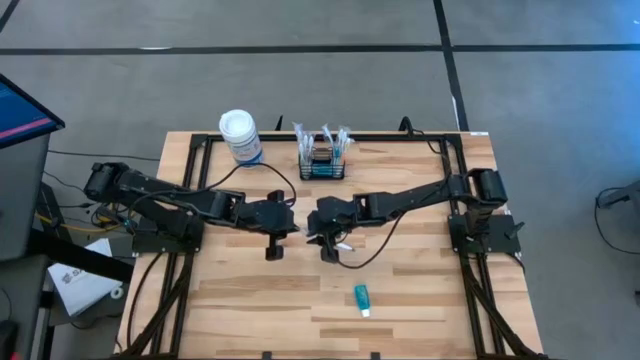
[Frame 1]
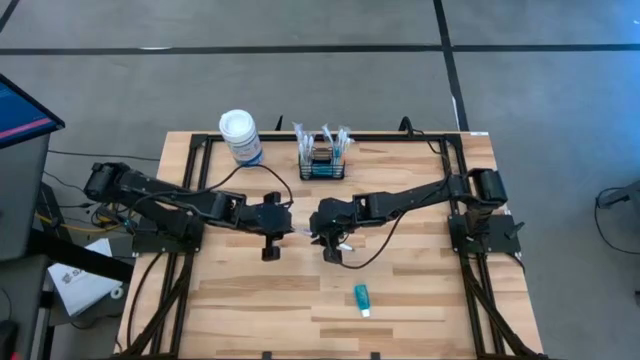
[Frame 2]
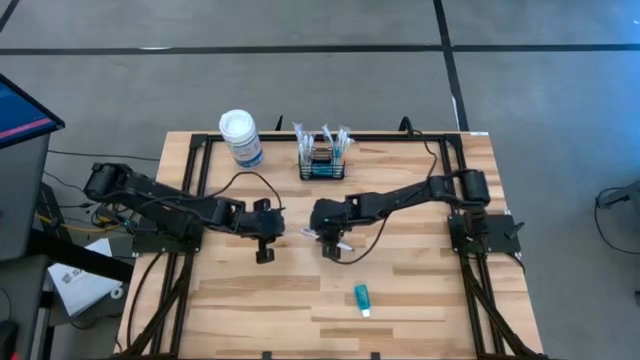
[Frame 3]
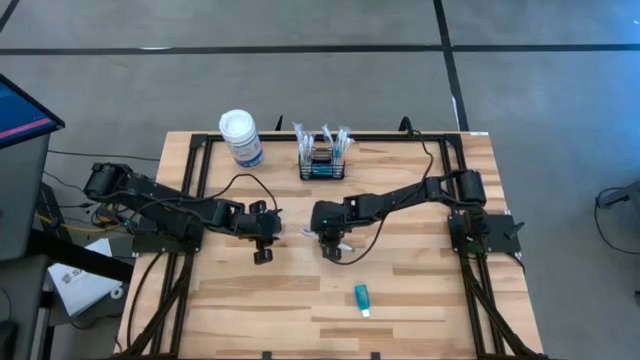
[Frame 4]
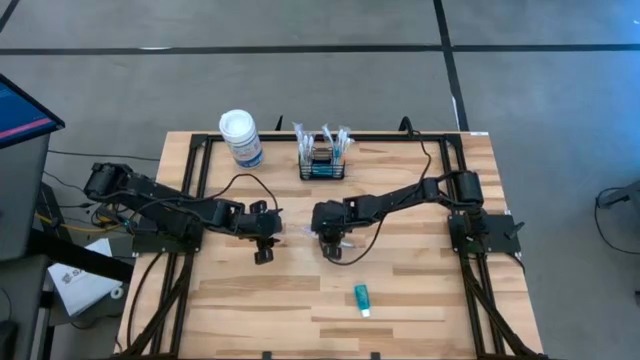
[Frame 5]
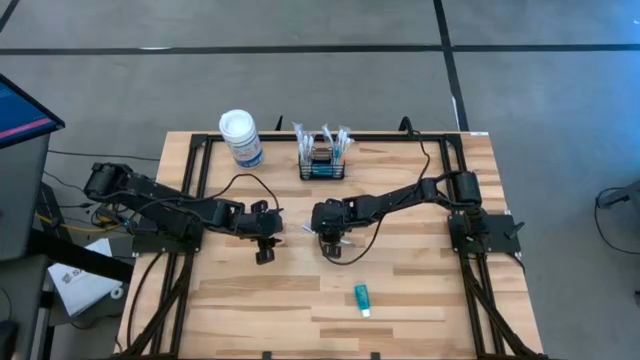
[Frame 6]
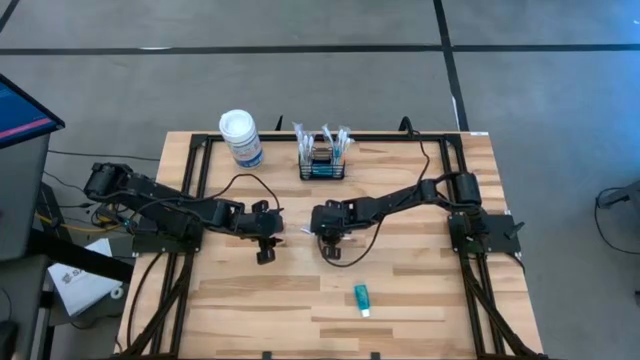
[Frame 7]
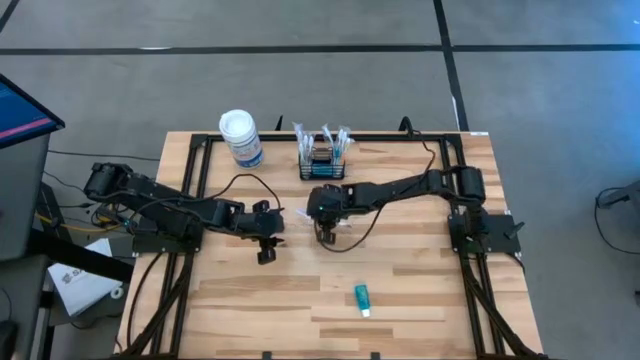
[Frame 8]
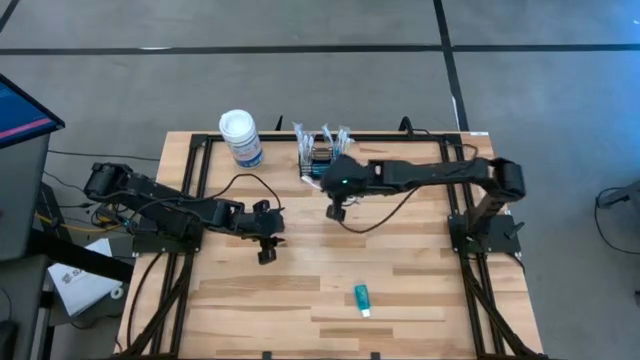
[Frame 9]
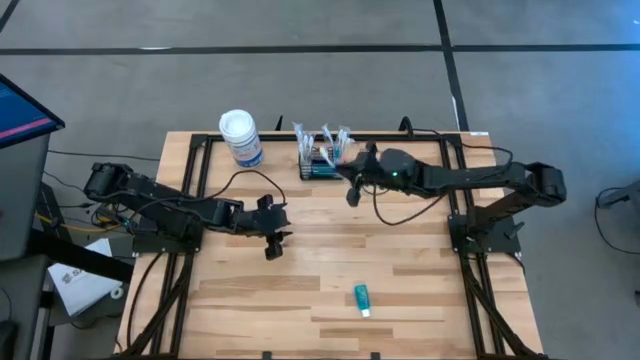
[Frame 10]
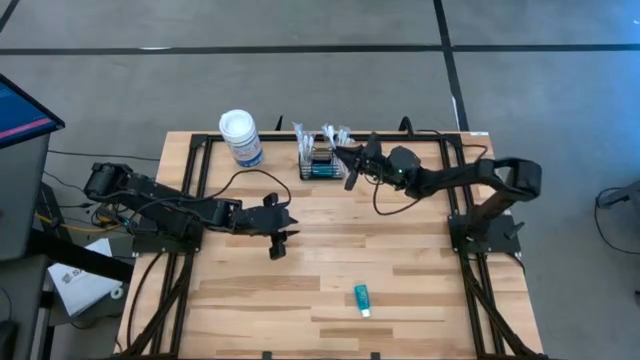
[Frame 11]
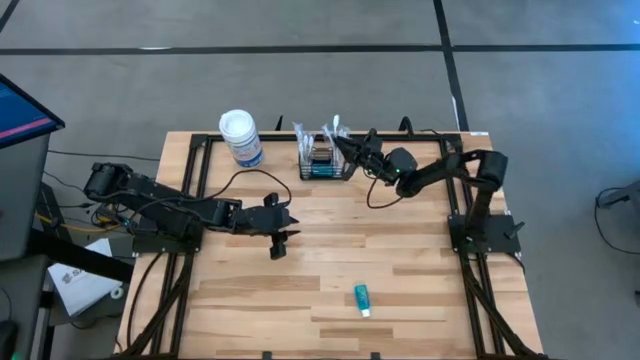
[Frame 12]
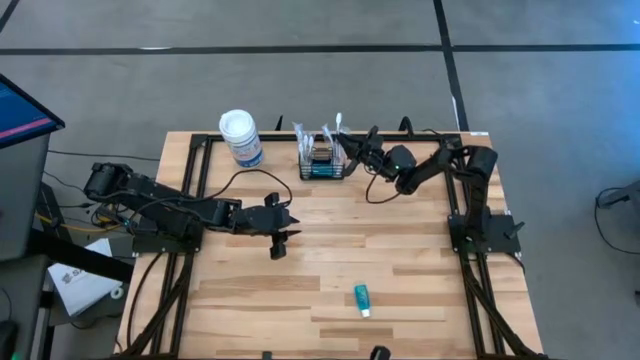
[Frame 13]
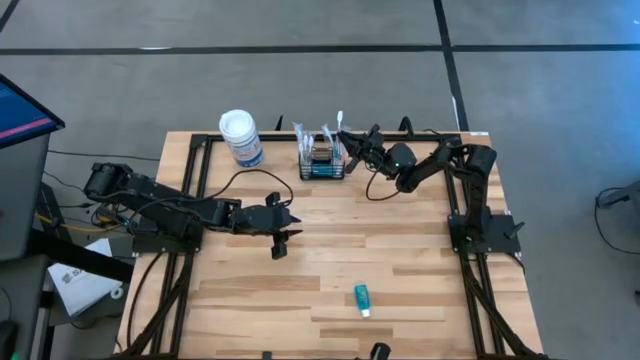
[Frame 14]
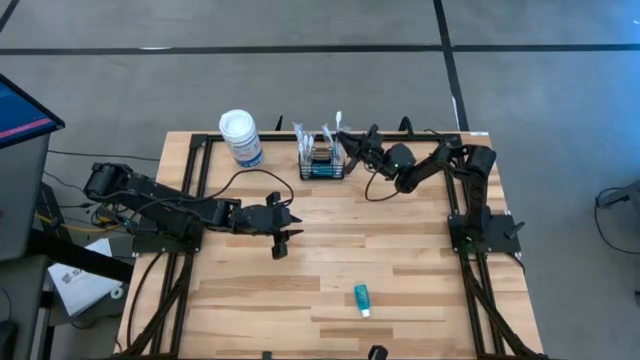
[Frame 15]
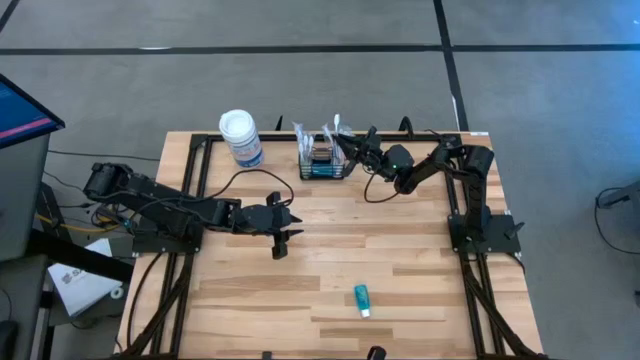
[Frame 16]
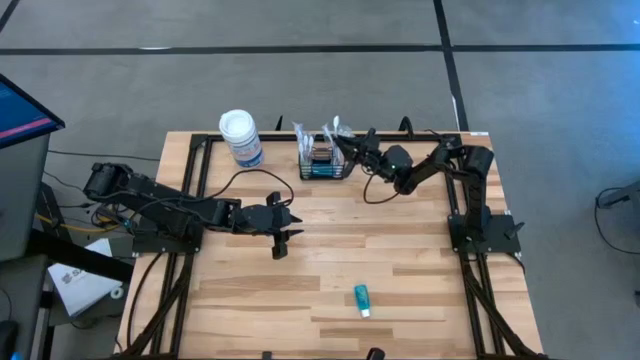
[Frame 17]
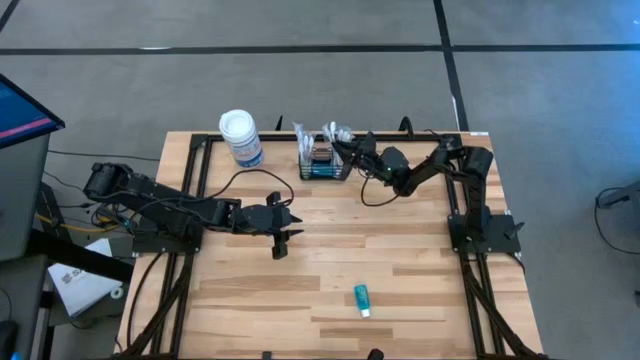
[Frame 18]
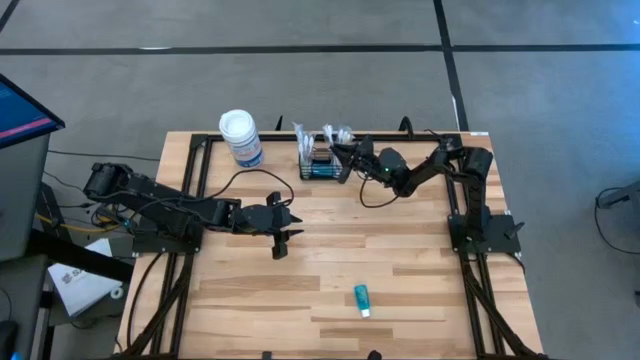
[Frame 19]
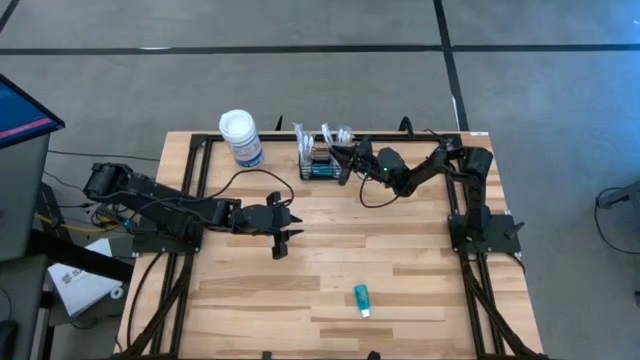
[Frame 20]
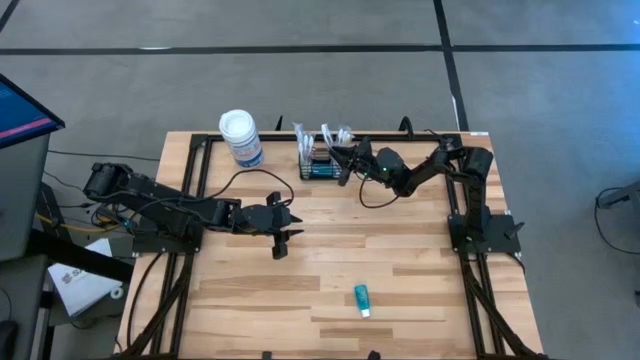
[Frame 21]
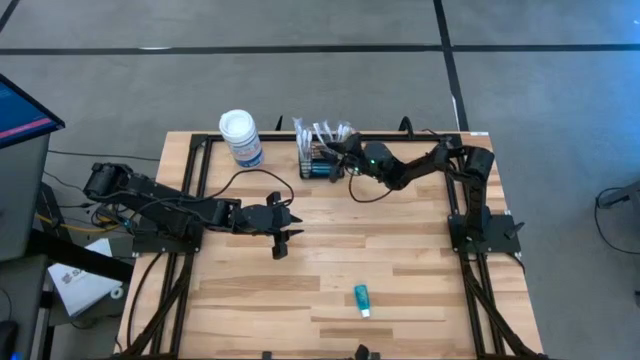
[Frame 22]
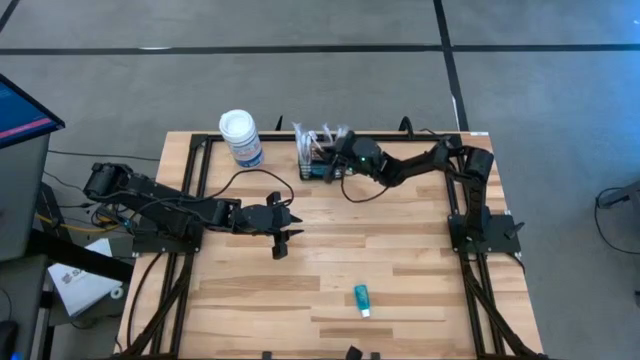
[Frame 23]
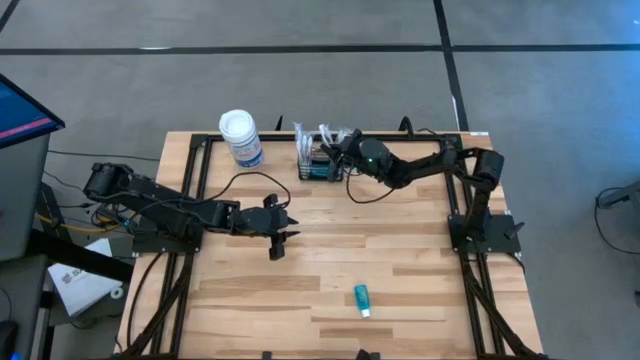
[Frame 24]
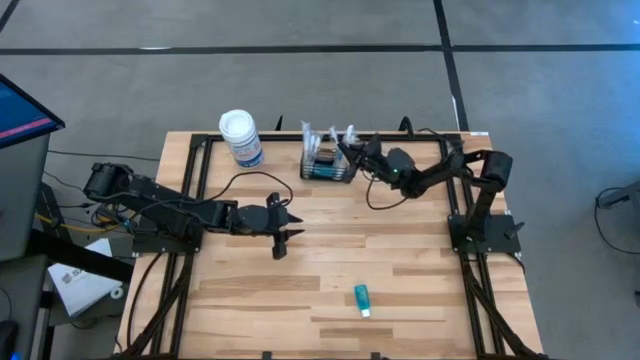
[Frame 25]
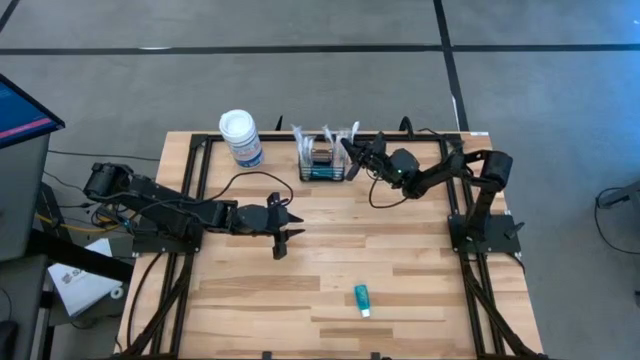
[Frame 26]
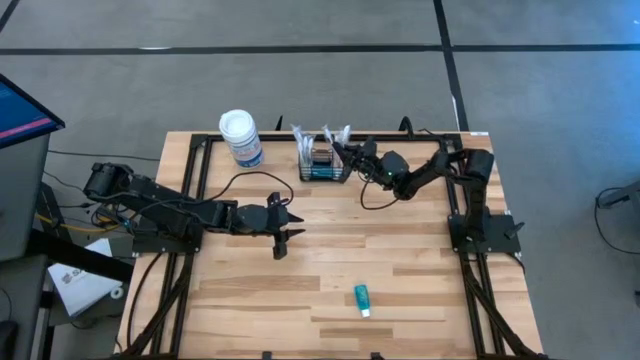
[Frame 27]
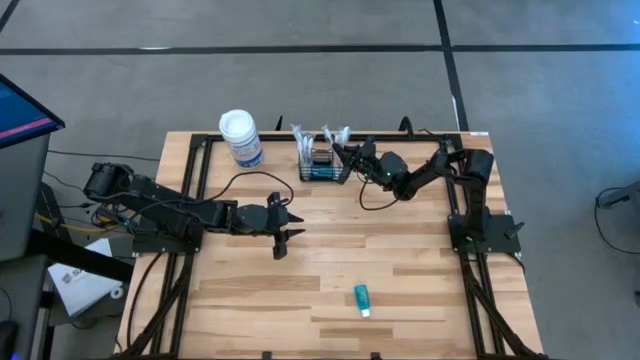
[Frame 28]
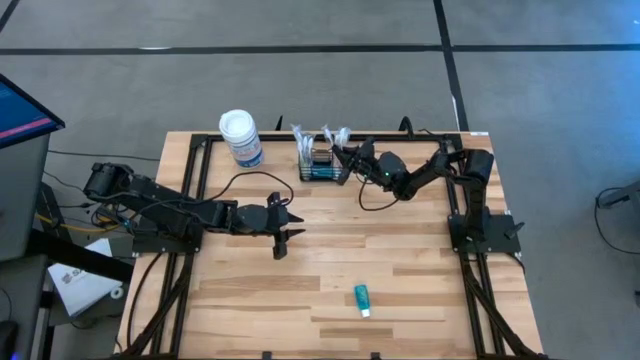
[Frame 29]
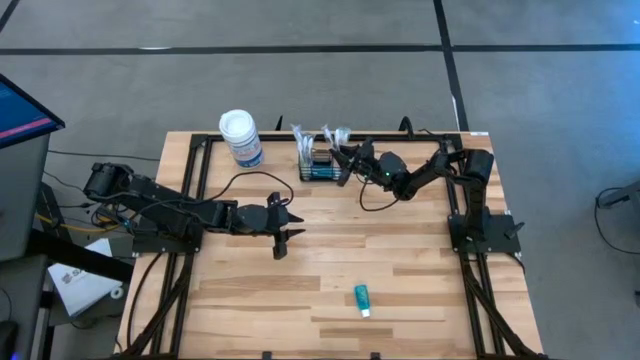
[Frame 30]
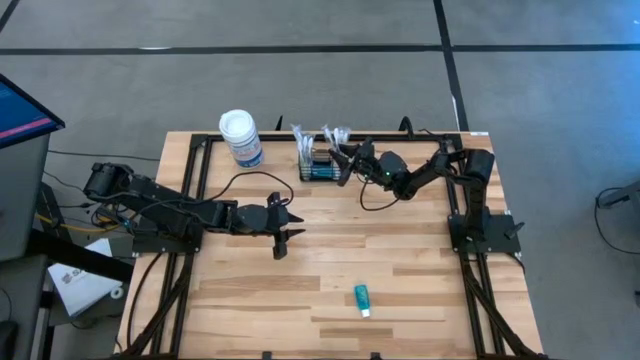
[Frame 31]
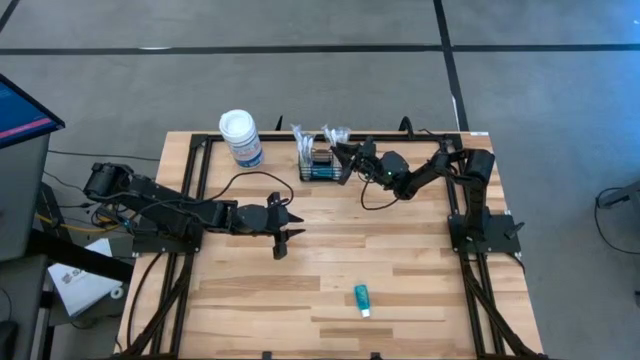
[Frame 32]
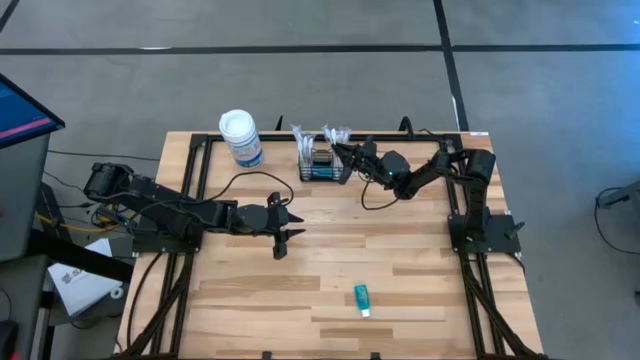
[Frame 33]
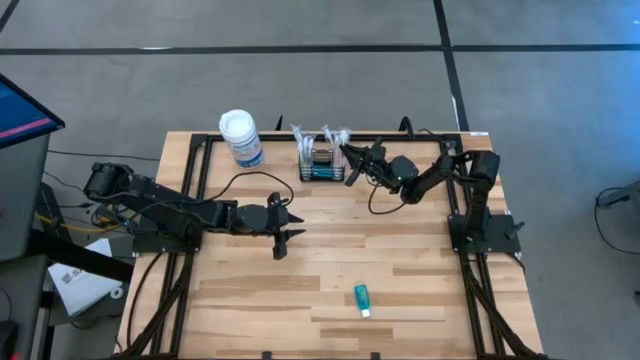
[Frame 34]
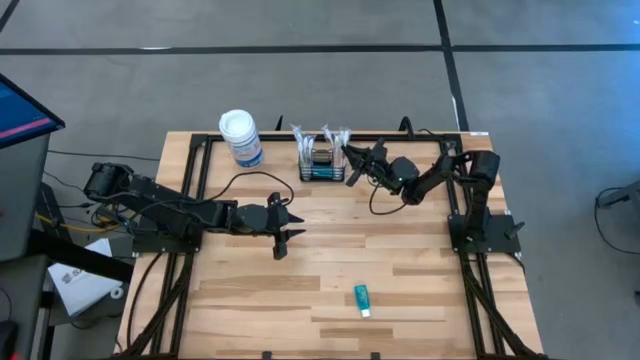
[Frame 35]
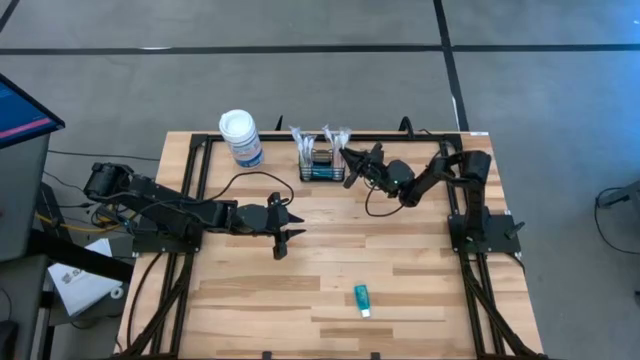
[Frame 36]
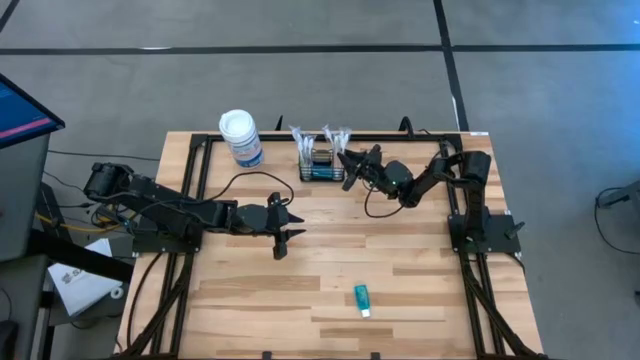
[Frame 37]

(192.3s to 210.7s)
Task: Pick & Place toothbrushing station
Put the purple toothbrush into the black wire organizer

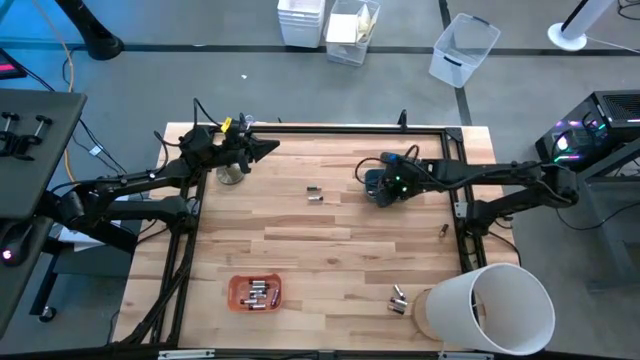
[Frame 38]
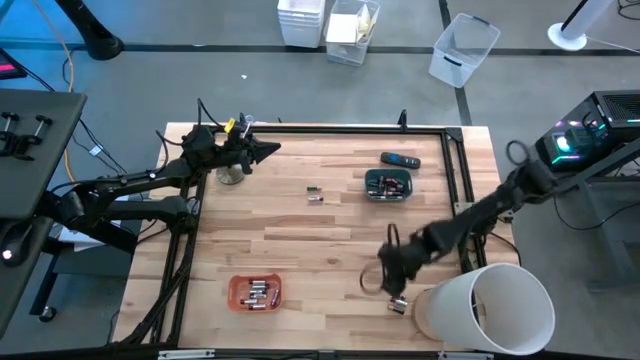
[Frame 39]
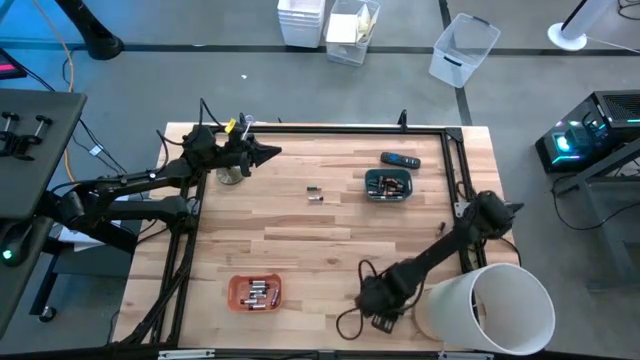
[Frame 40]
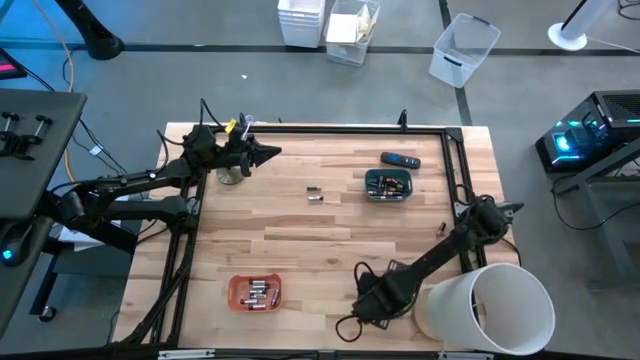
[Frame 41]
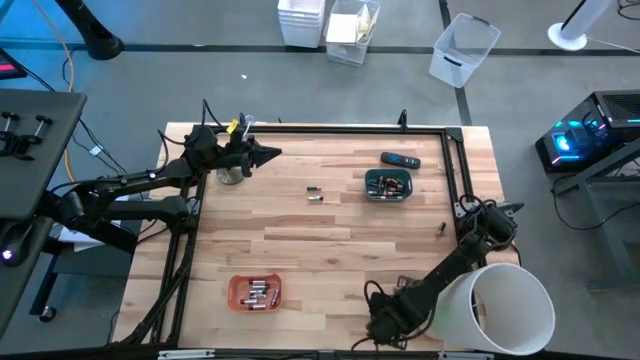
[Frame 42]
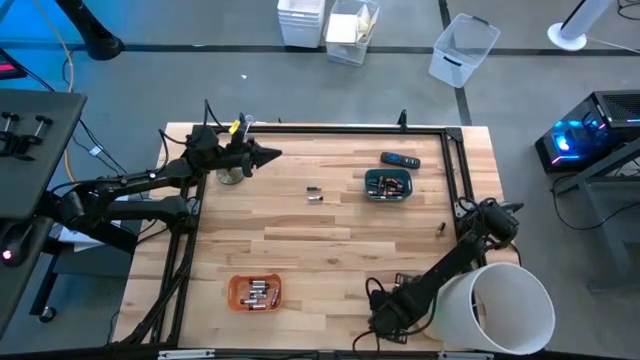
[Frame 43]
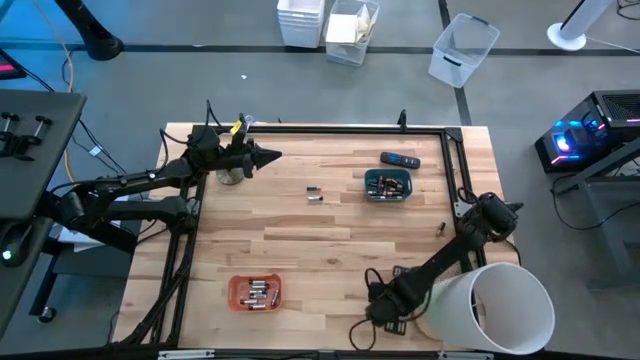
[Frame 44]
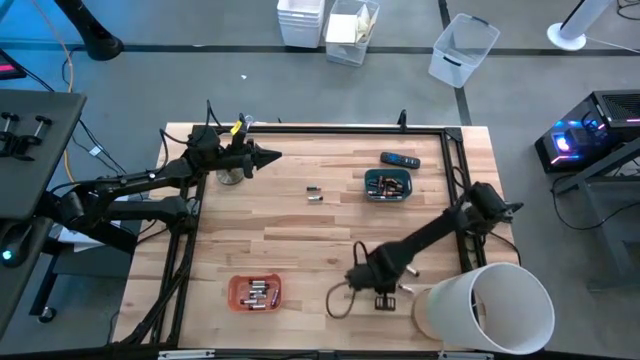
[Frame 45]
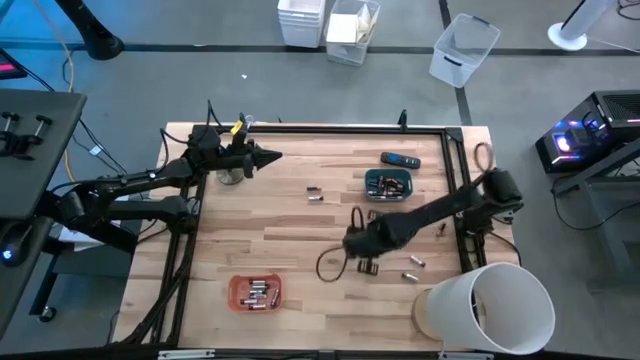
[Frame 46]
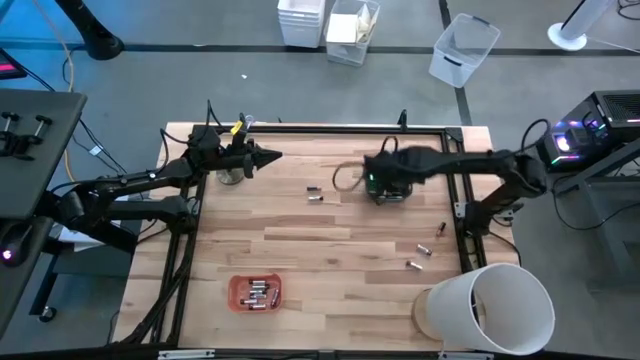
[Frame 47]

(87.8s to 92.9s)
Task: Sort batteries
Put the black battery into the blue bin
